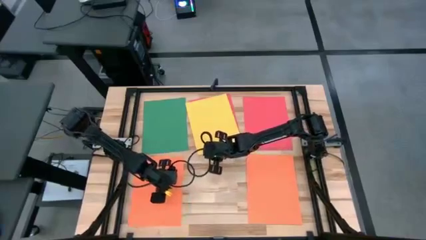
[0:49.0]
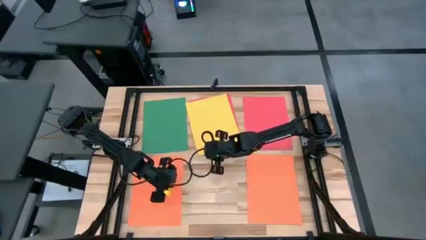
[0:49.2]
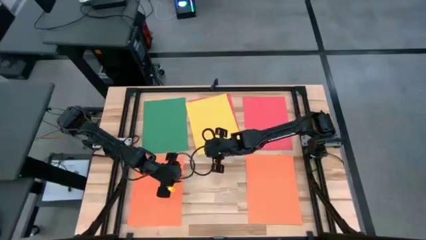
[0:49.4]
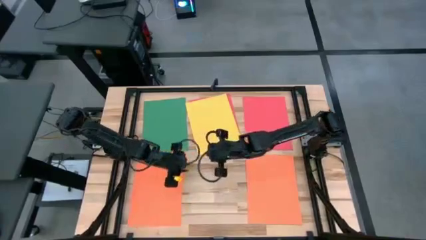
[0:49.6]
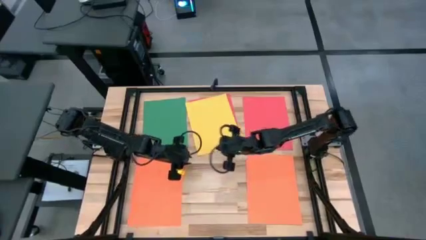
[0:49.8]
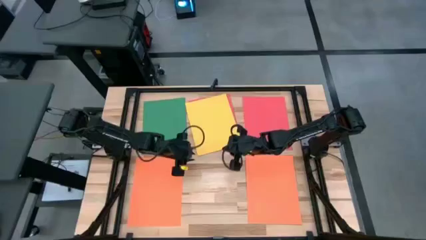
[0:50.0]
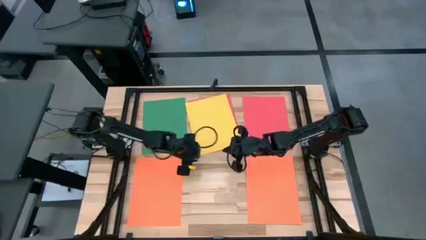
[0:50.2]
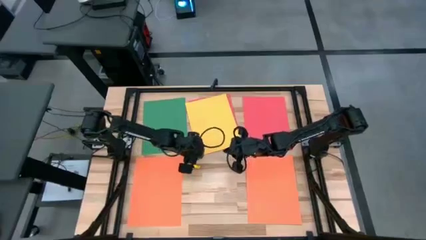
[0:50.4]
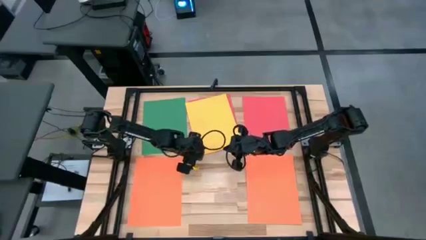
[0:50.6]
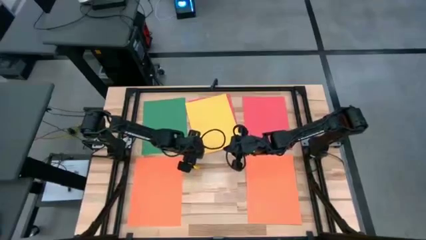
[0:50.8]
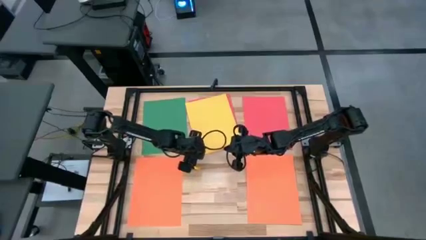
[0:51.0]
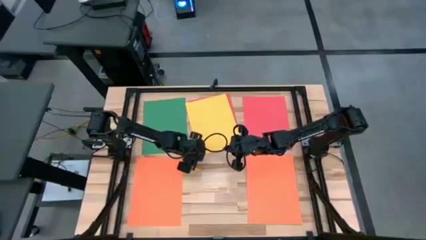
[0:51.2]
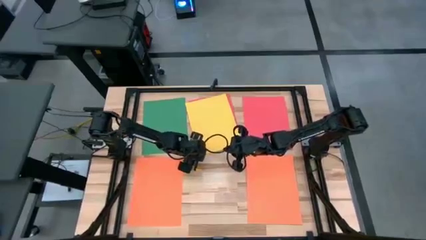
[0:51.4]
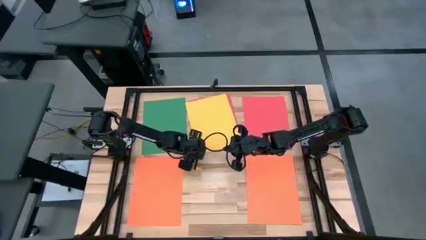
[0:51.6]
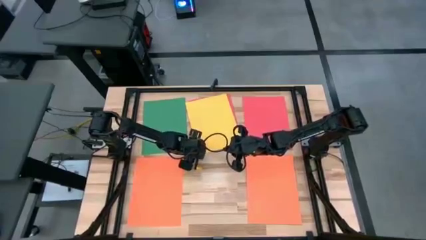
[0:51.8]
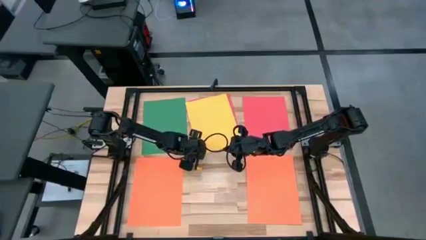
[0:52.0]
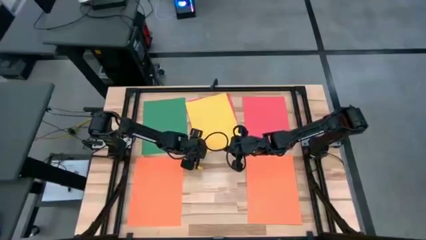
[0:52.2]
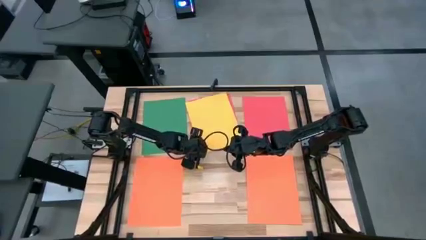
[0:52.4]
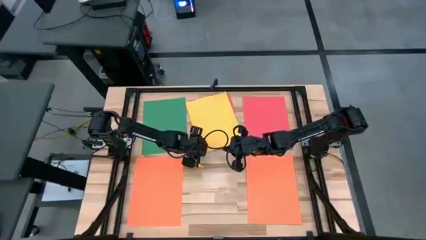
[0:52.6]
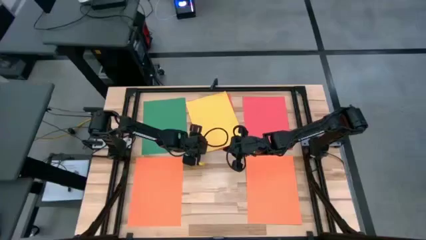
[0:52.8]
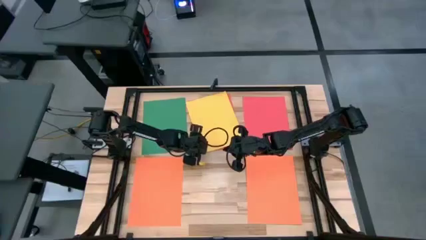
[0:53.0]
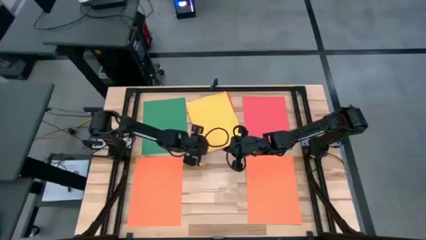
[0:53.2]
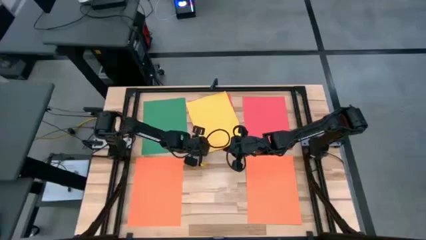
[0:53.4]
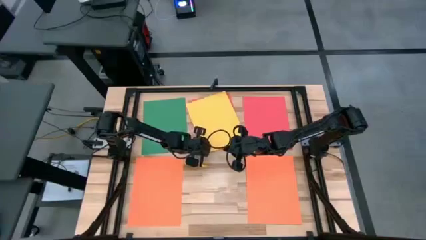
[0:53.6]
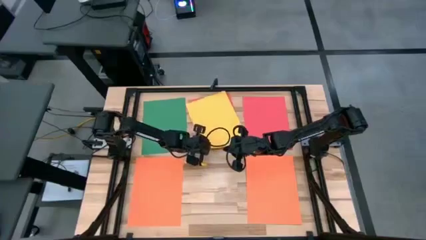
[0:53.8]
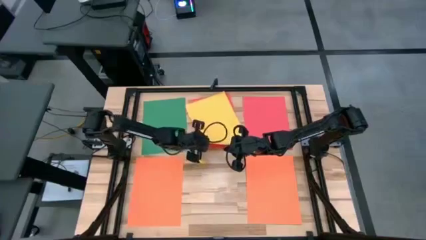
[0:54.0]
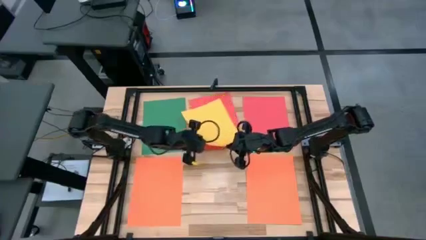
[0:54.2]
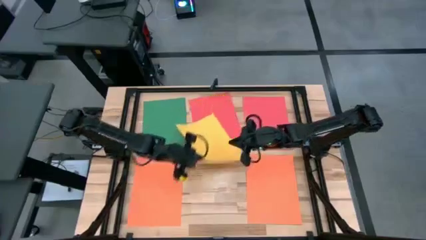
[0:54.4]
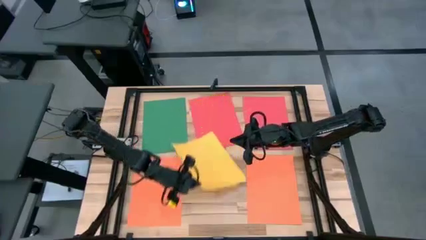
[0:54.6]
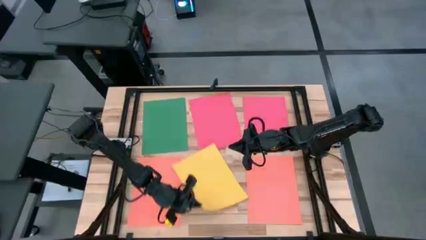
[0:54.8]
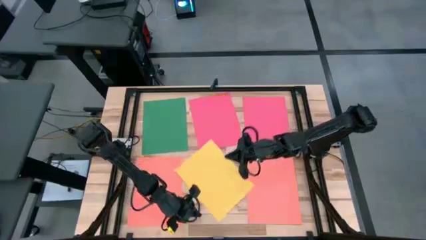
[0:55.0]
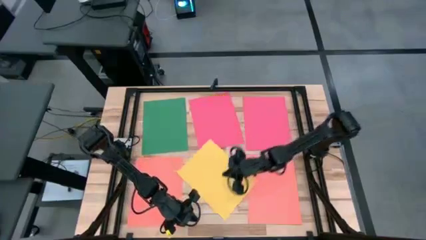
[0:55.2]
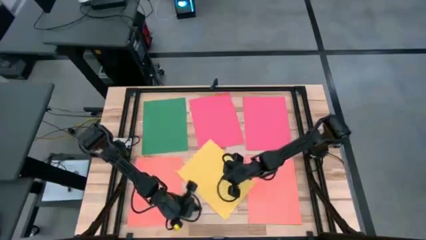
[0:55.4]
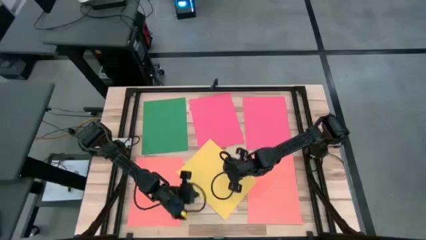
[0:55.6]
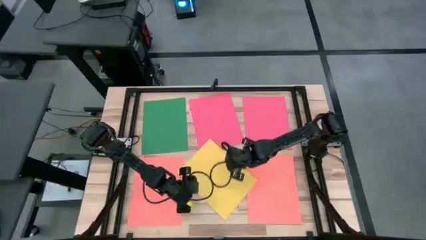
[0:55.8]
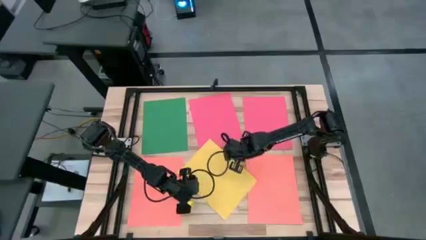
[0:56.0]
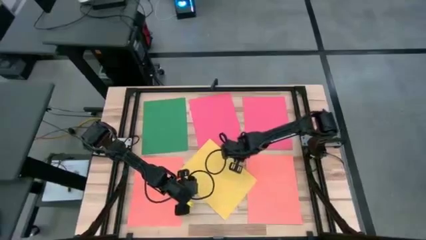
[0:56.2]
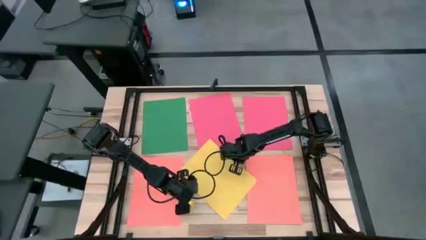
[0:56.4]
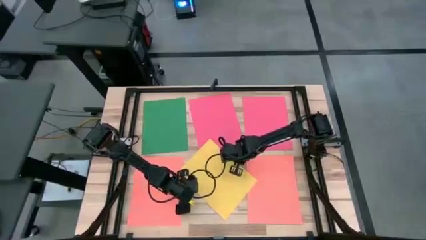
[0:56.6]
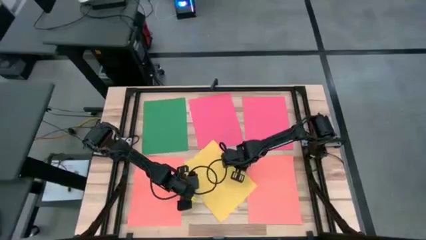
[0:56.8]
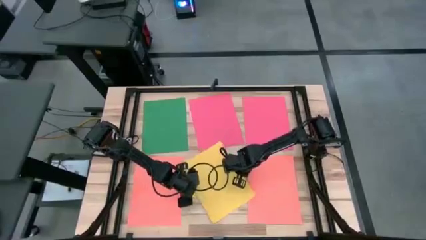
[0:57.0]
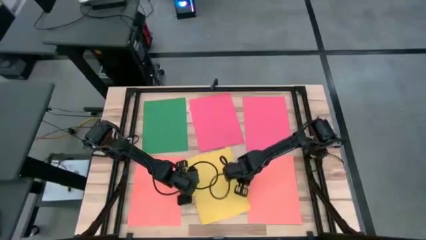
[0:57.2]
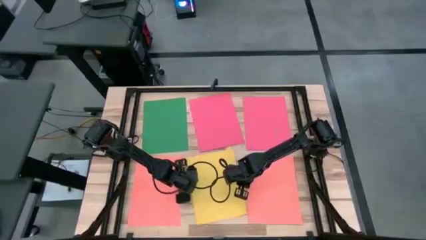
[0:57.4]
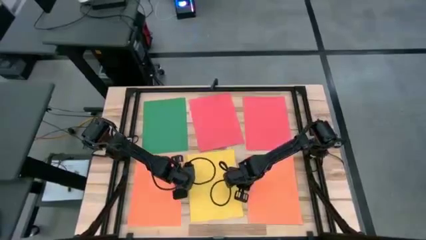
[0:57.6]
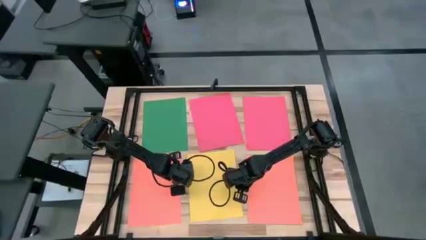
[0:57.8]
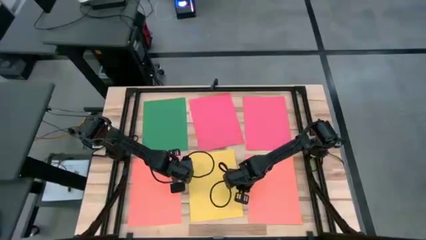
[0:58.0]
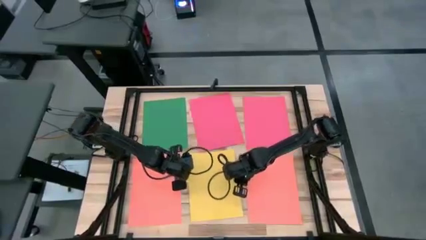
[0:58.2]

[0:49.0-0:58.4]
Task: Organize paper
Put the yellow paper on the bottom center of the table

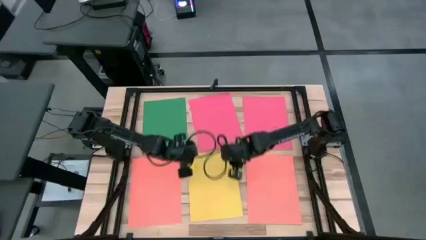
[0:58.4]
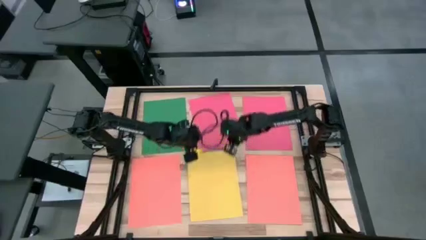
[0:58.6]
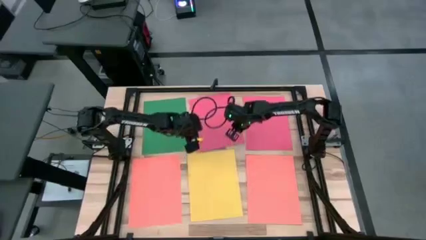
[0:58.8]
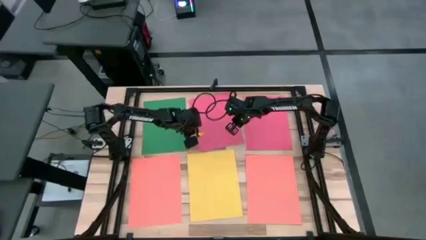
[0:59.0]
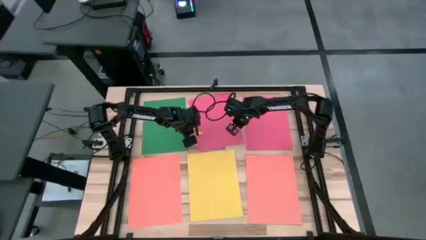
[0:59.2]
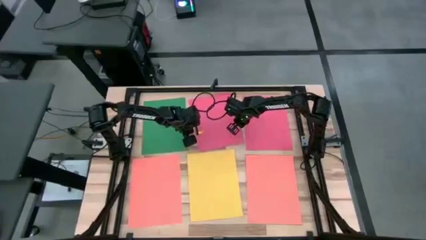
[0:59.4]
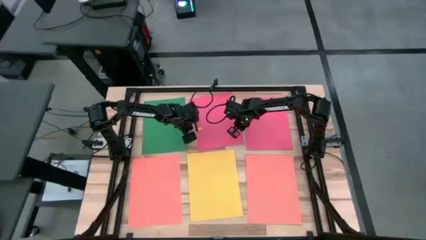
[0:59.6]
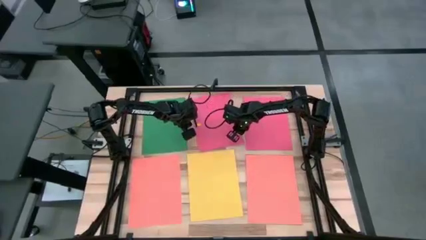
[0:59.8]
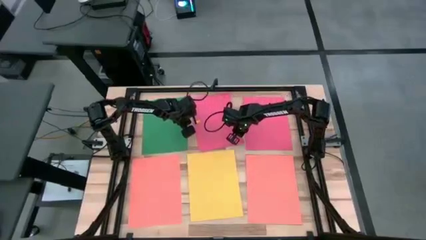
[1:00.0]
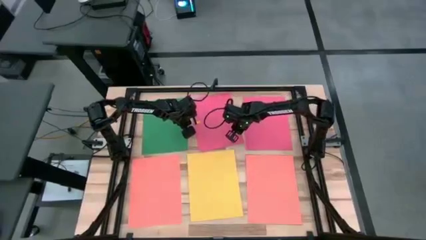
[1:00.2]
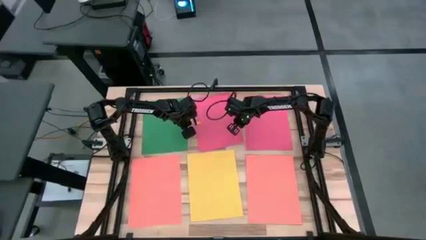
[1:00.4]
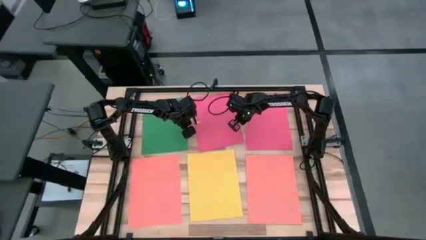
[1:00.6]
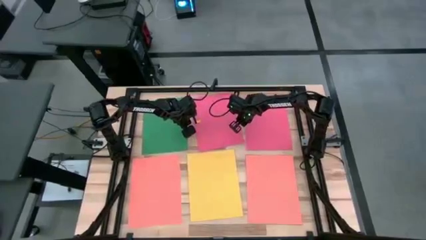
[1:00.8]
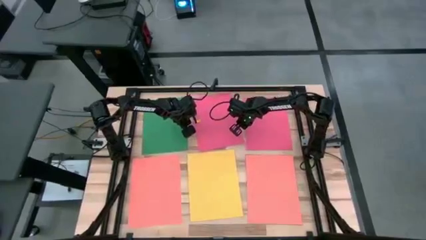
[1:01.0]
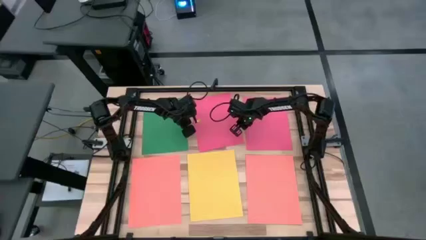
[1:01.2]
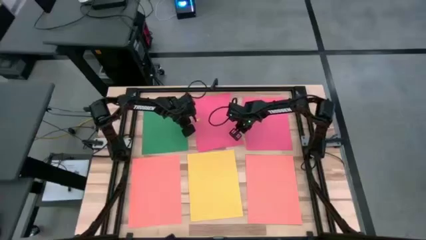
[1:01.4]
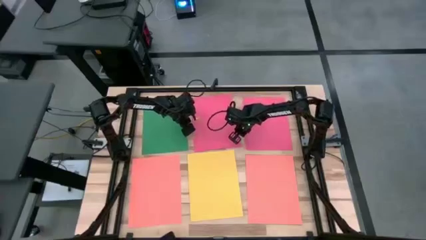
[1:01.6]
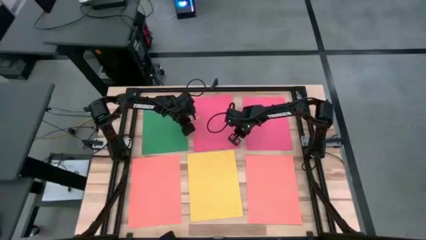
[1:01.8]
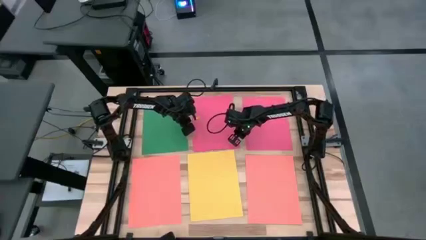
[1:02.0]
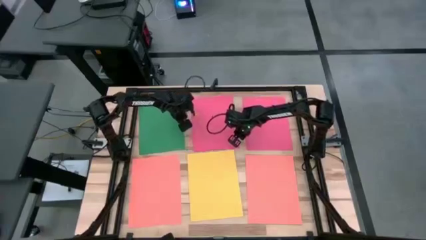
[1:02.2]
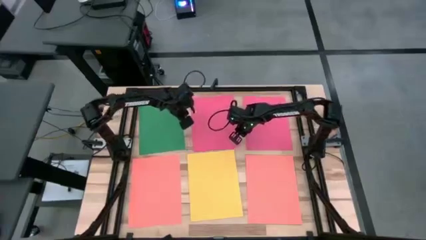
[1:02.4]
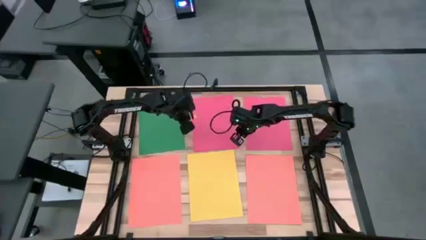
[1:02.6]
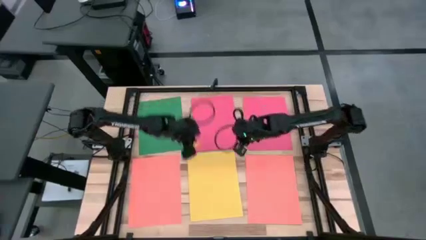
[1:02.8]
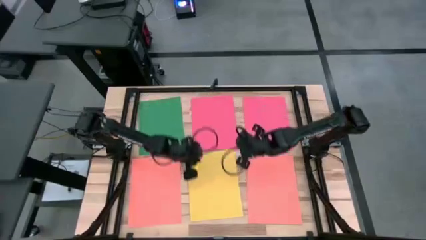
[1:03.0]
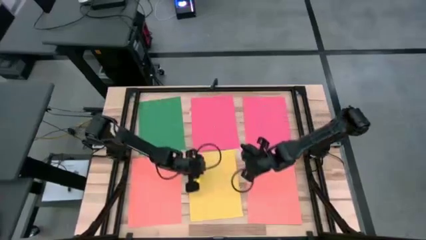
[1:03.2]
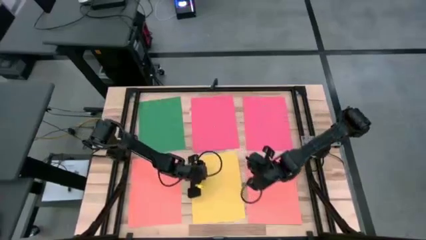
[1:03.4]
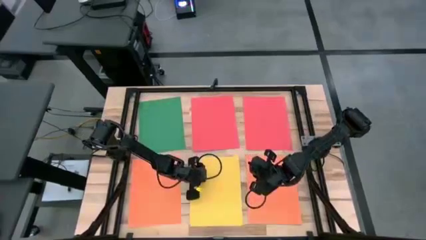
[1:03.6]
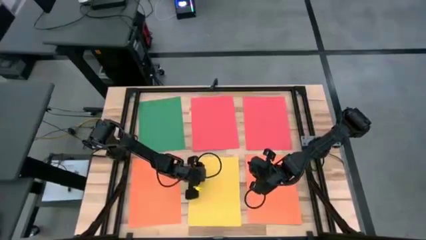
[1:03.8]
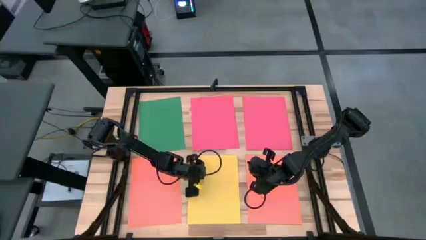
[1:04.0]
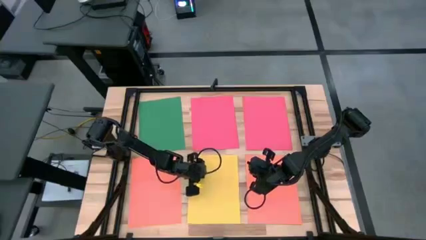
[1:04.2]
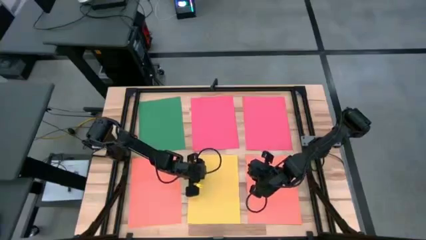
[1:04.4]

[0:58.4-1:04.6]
Adjust the papers
